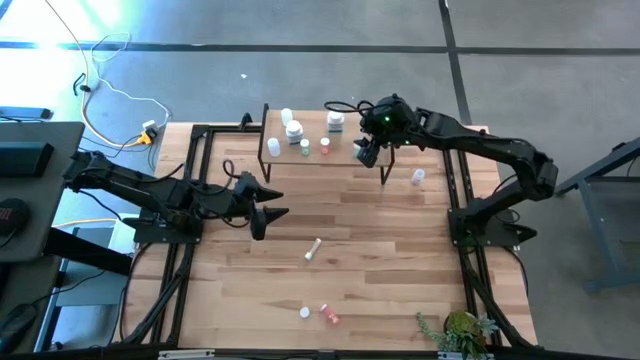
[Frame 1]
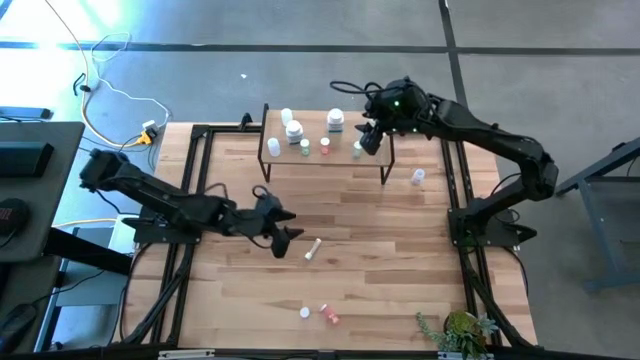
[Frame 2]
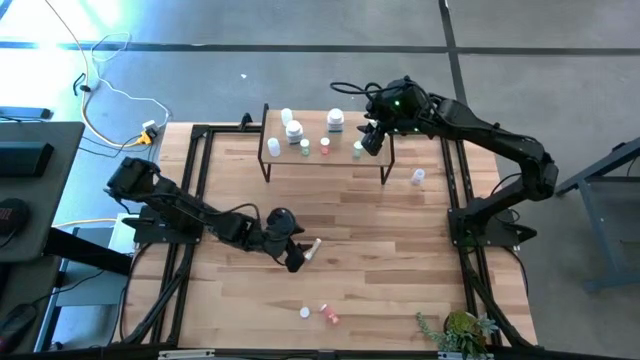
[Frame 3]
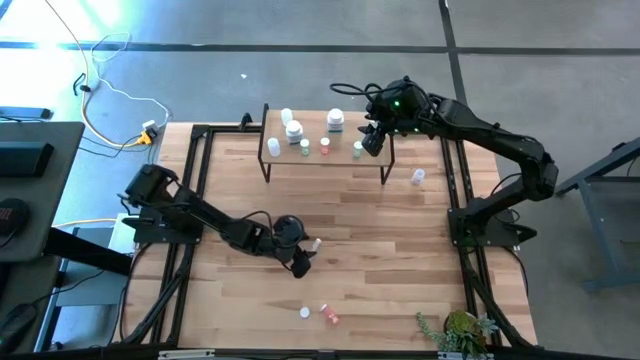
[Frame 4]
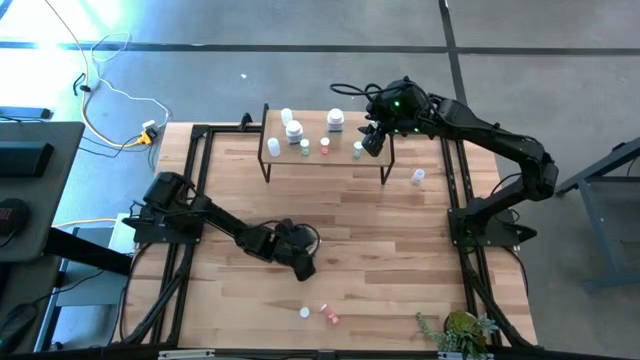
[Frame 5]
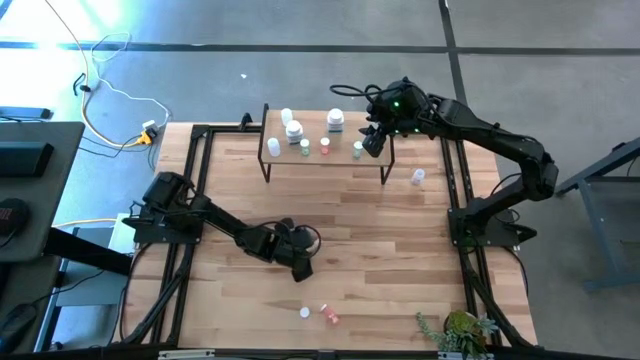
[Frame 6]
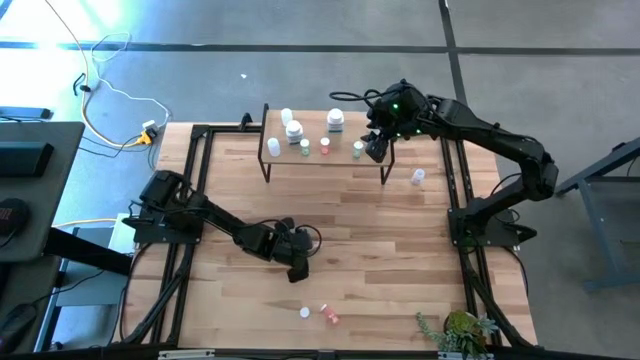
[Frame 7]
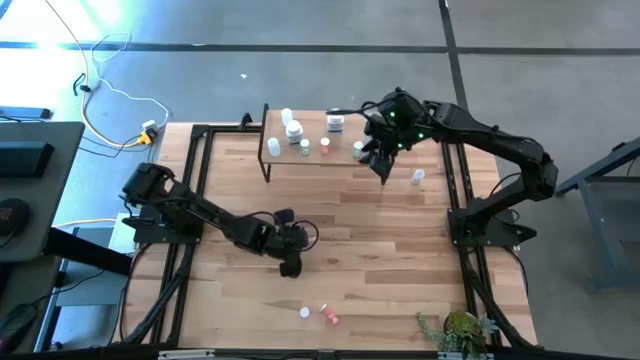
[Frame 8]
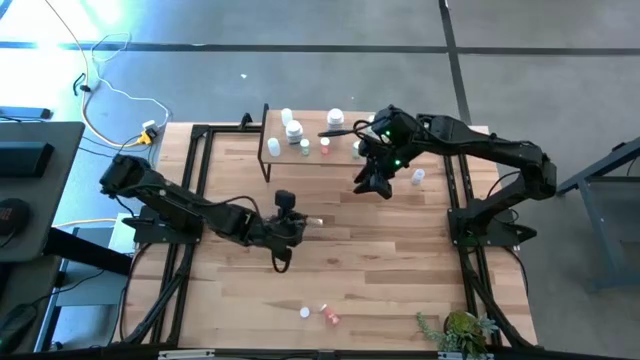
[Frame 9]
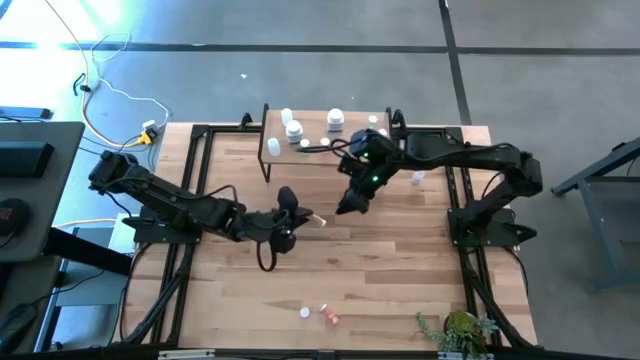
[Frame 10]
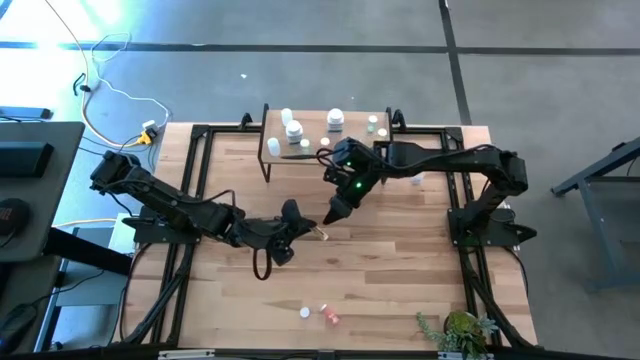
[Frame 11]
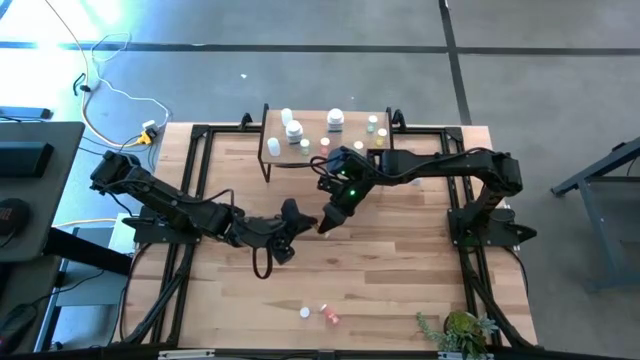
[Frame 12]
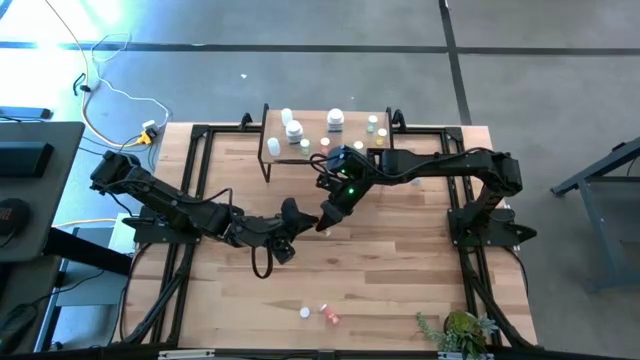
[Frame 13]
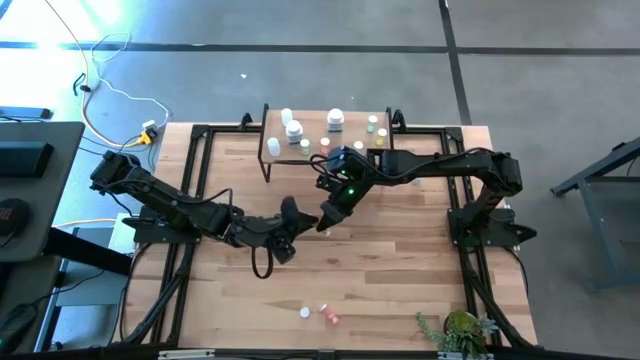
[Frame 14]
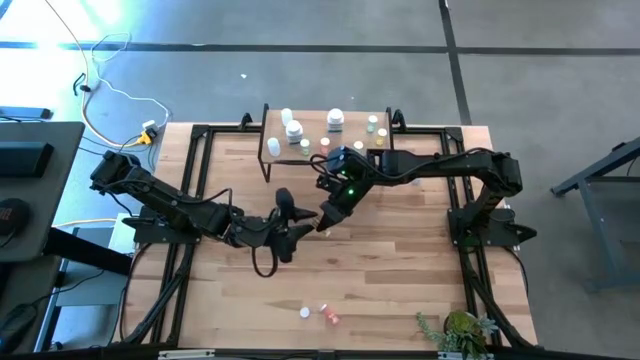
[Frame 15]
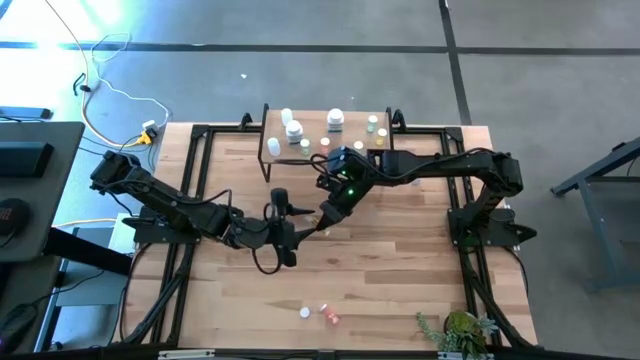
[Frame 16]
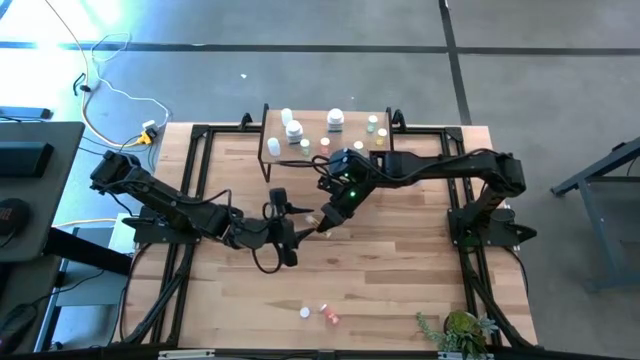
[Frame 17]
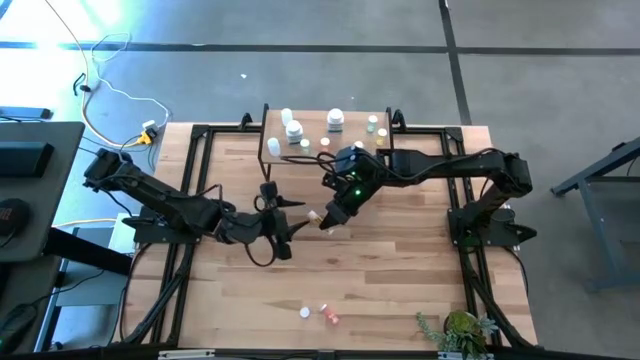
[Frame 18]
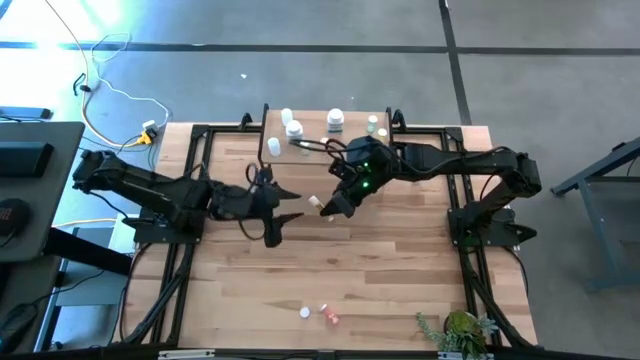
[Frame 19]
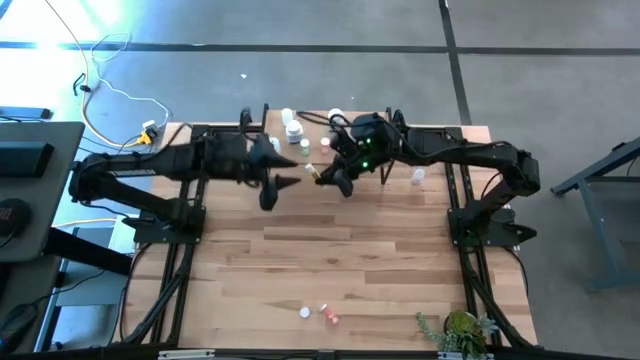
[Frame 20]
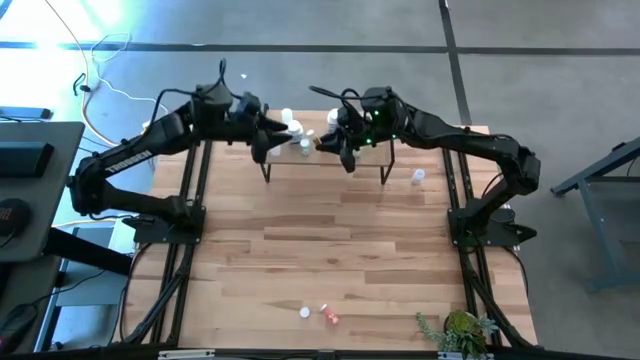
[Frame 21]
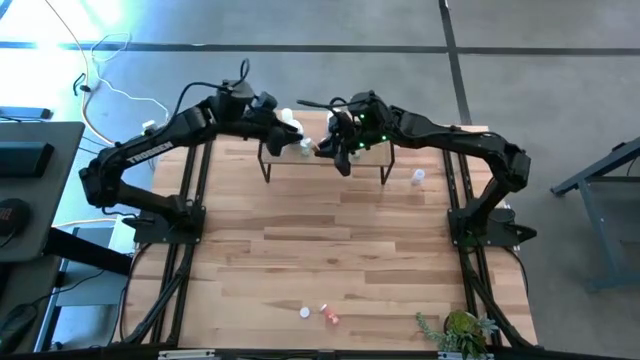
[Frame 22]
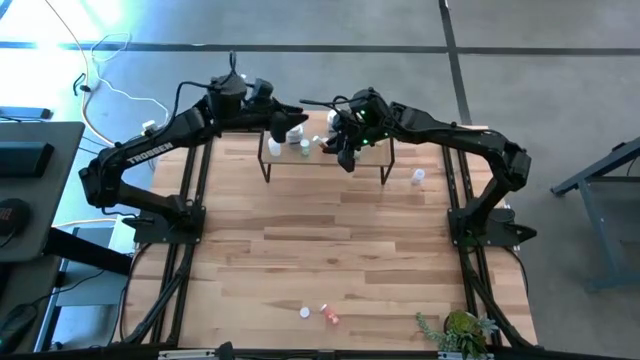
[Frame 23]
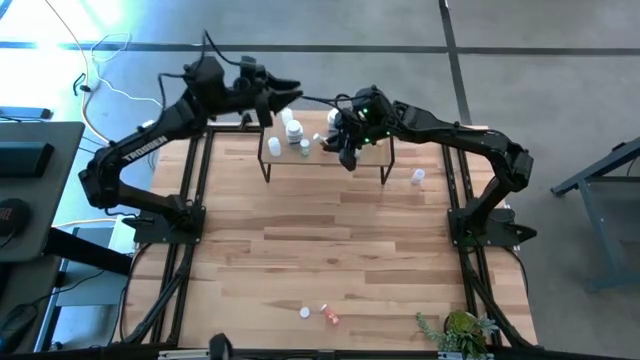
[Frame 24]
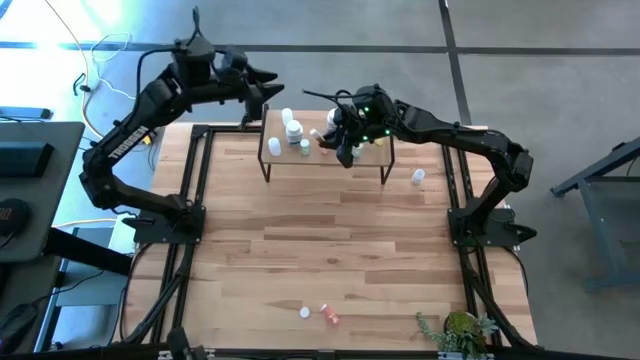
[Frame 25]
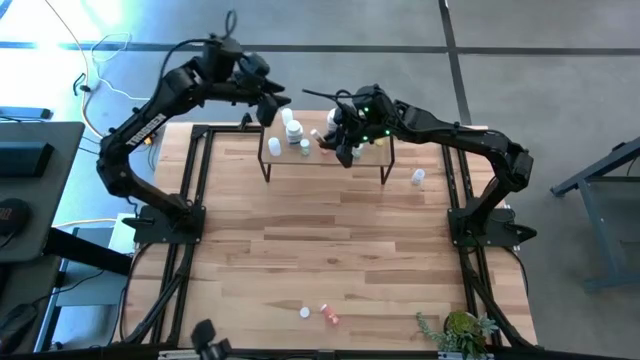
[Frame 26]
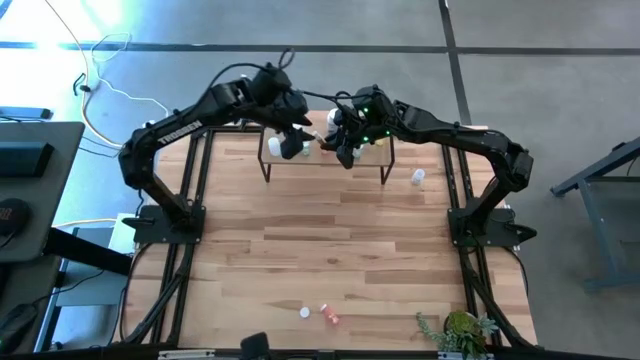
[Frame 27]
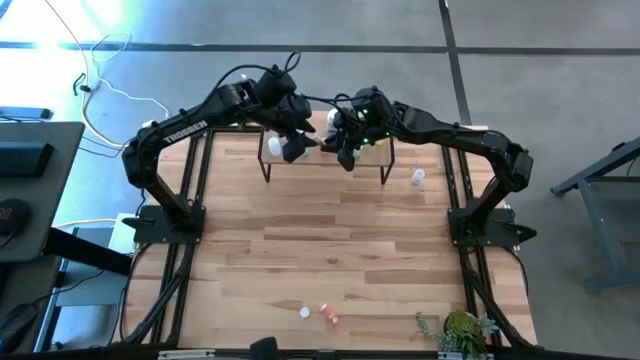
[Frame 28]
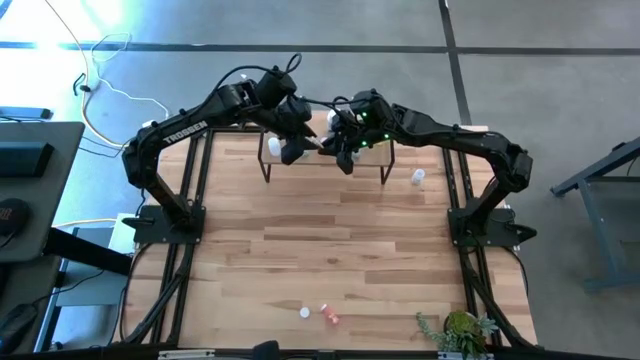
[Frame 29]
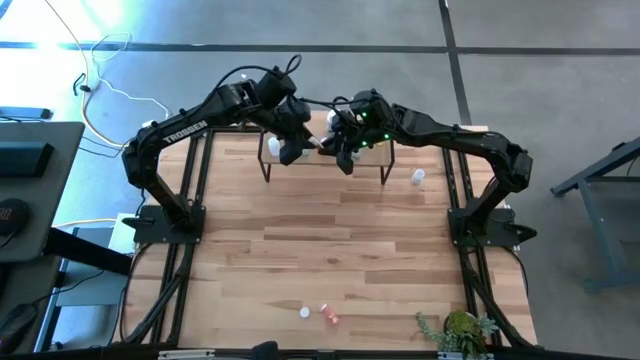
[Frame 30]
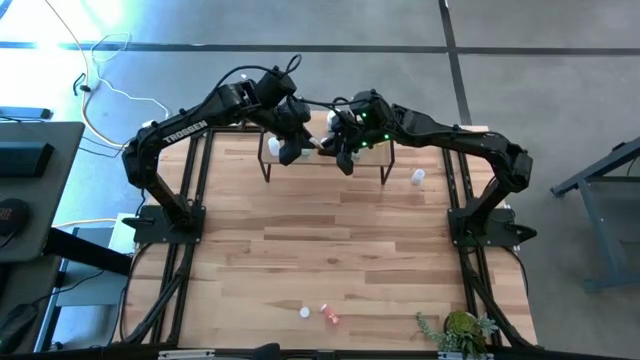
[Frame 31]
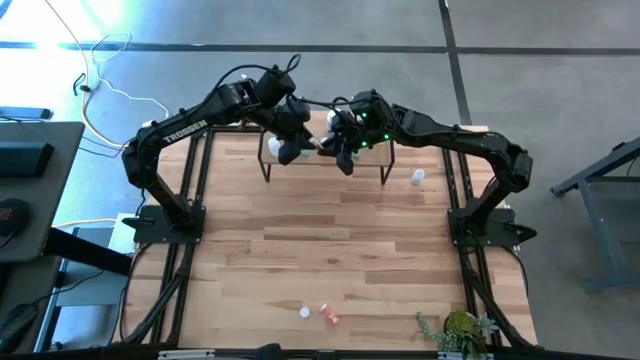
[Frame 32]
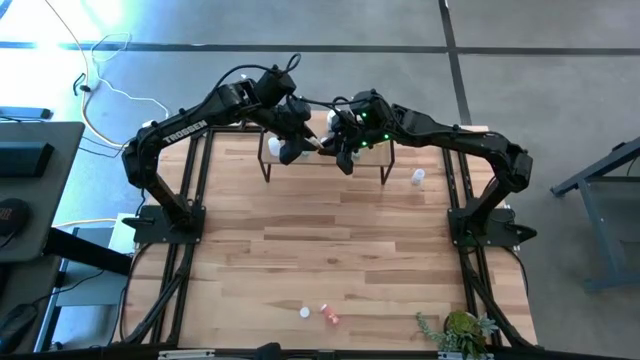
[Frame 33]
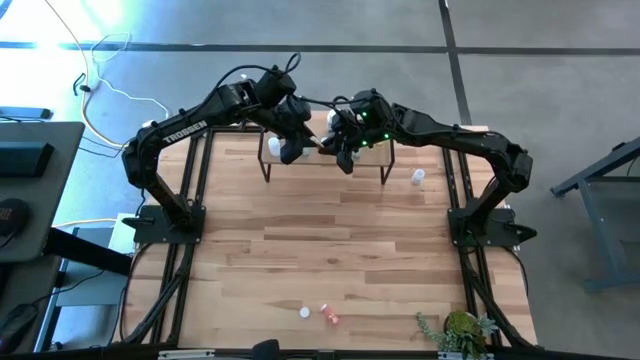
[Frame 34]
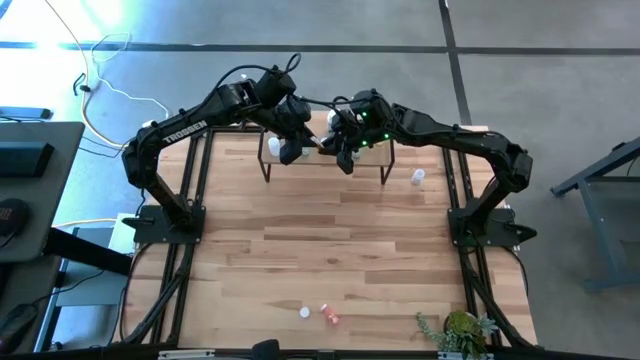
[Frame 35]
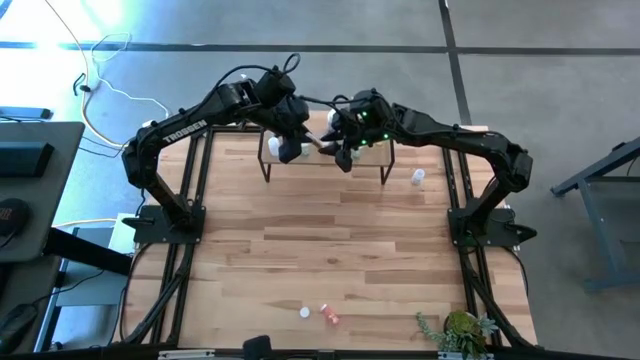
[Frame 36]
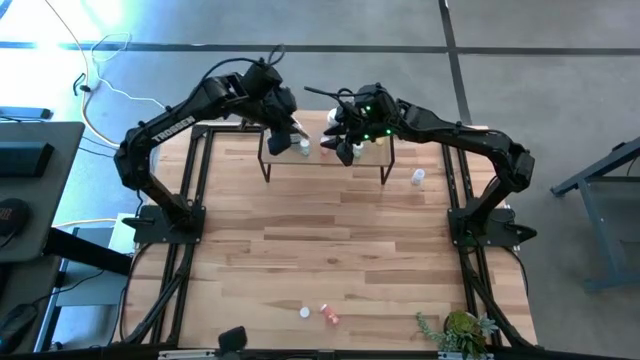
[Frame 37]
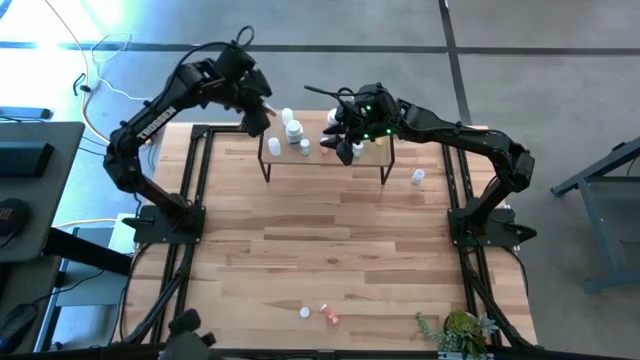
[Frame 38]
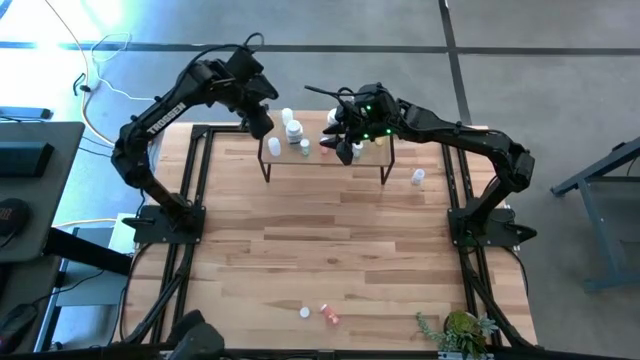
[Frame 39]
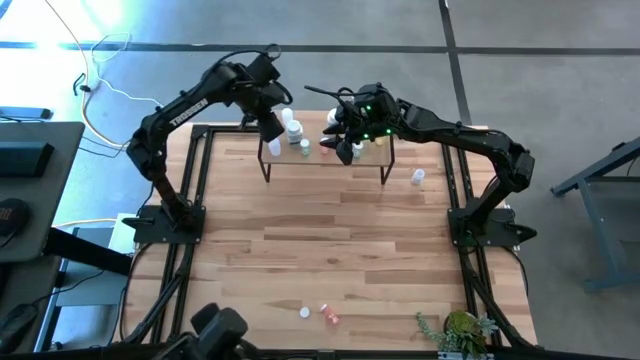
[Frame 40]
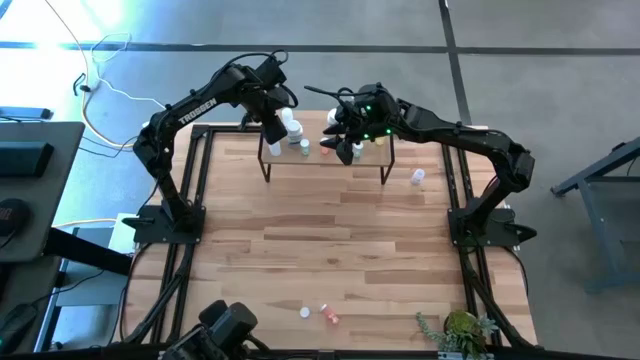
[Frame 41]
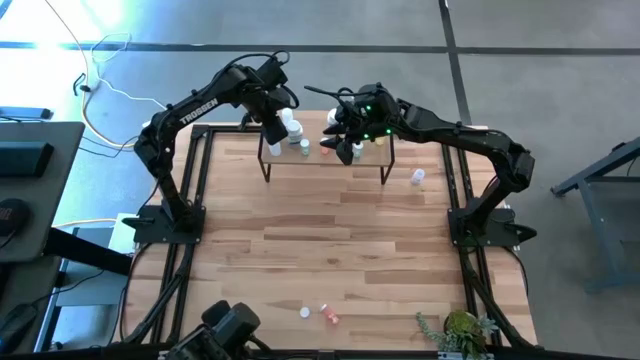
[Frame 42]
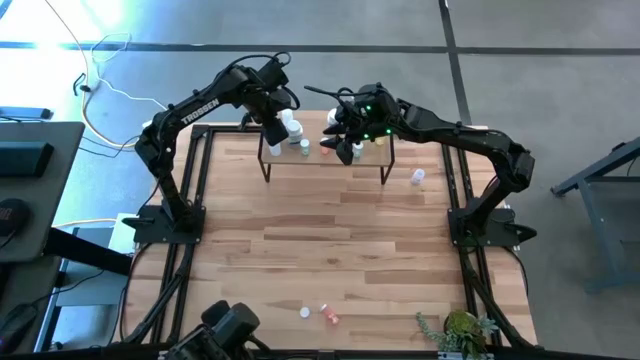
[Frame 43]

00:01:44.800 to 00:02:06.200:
Task: Pick and place medicine bottles onto shelf by color
Put the white yellow pill bottle on the shelf
